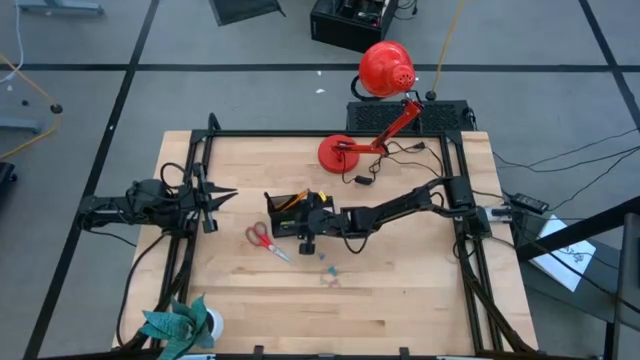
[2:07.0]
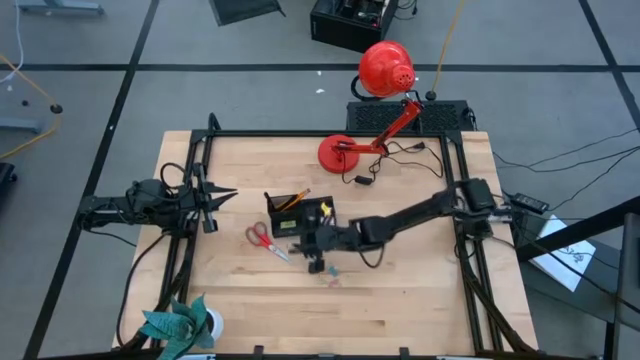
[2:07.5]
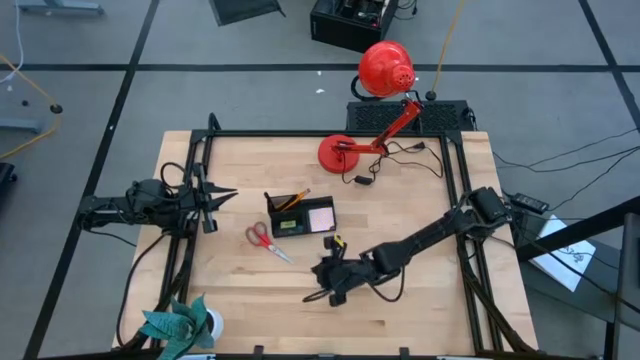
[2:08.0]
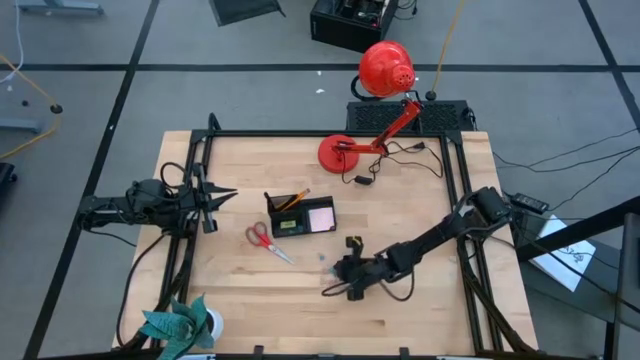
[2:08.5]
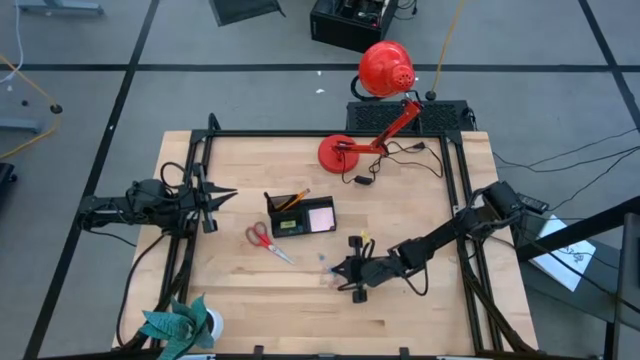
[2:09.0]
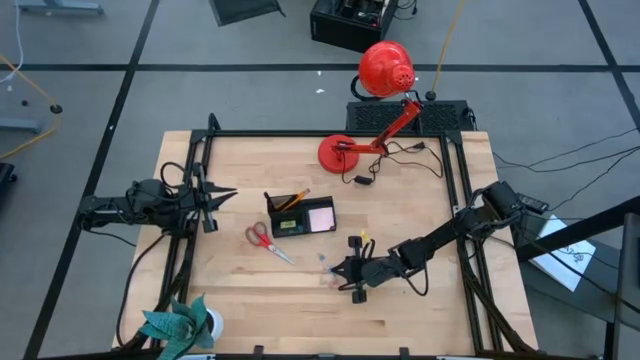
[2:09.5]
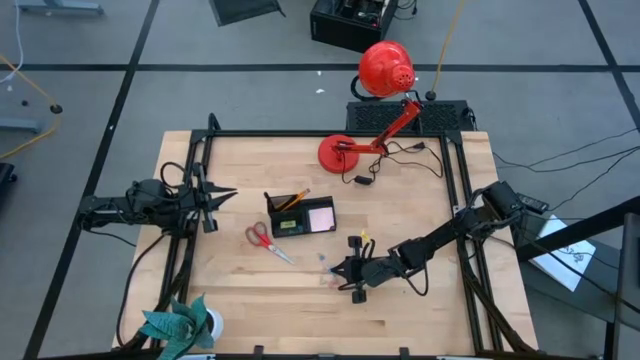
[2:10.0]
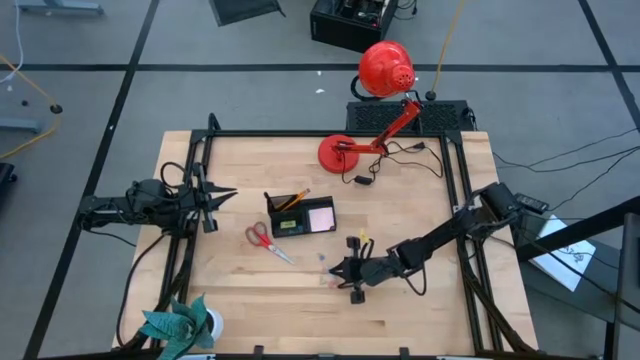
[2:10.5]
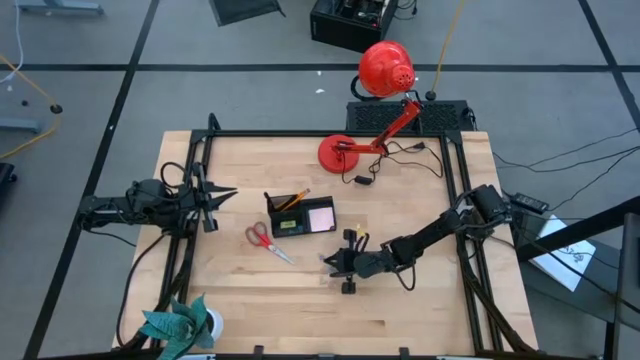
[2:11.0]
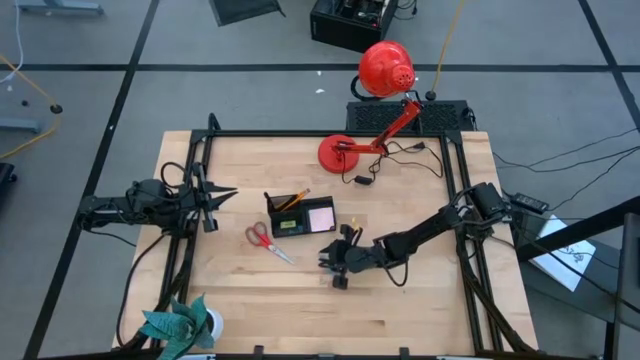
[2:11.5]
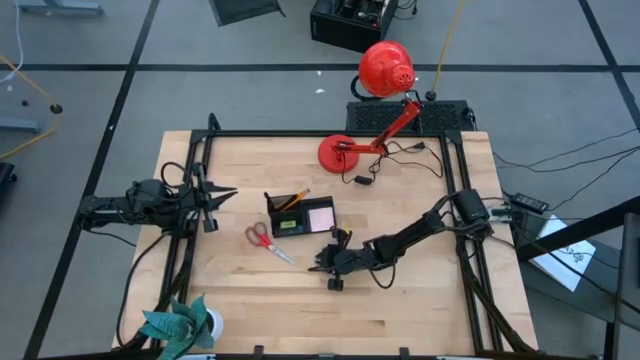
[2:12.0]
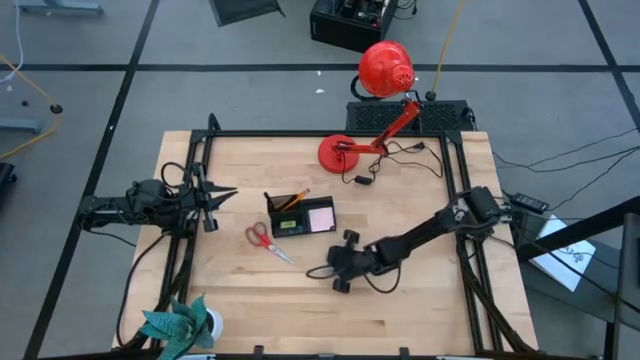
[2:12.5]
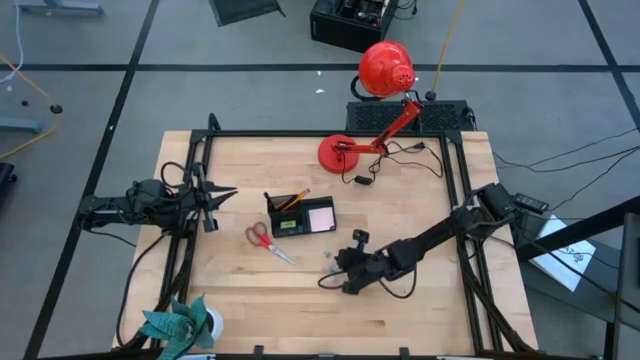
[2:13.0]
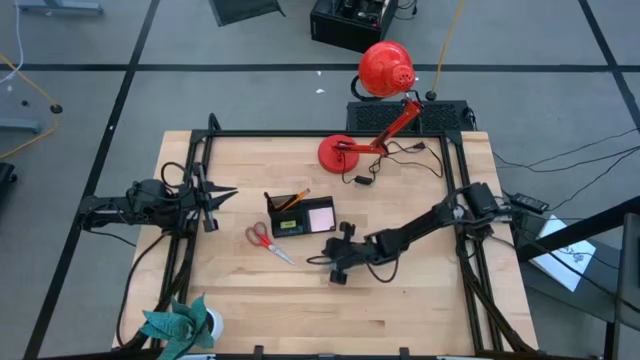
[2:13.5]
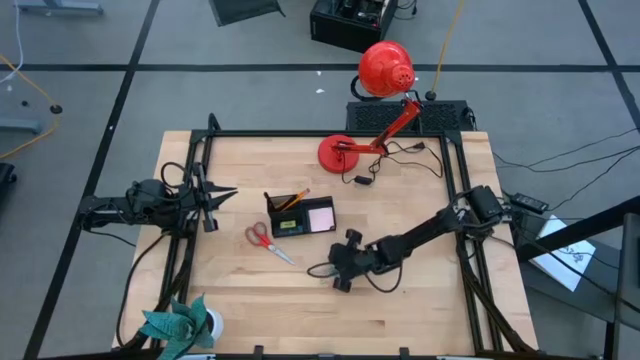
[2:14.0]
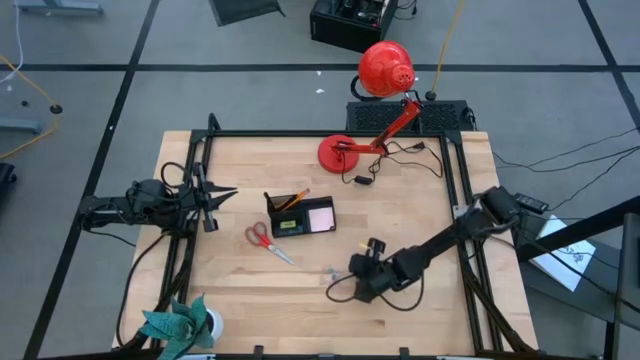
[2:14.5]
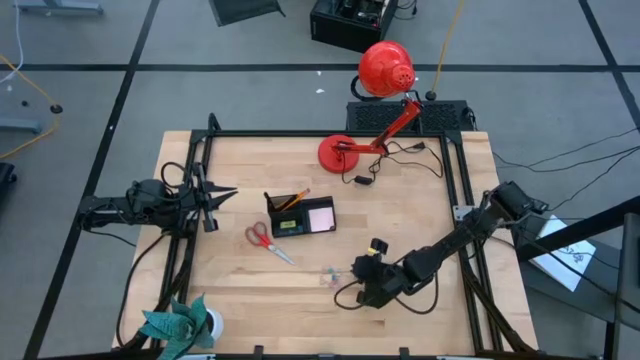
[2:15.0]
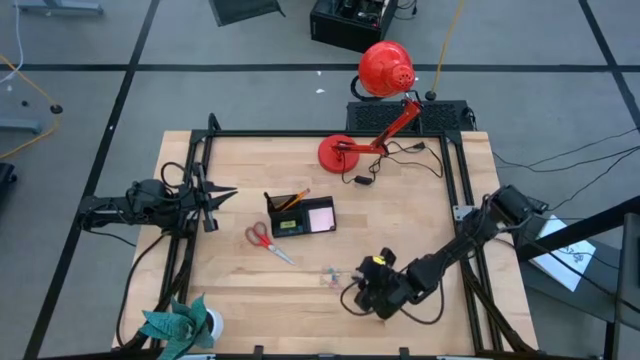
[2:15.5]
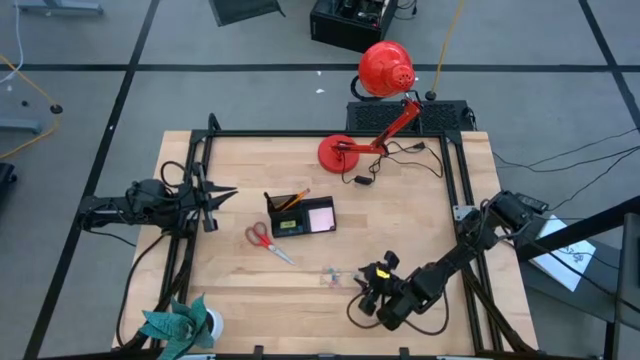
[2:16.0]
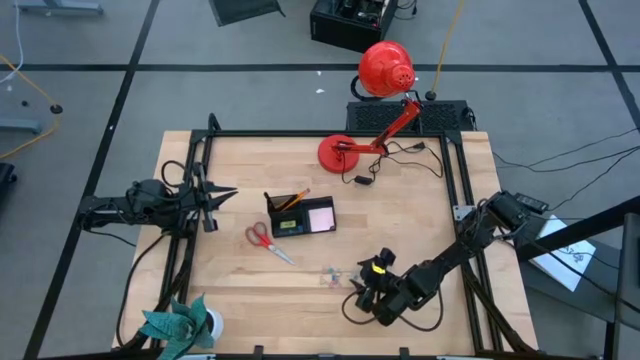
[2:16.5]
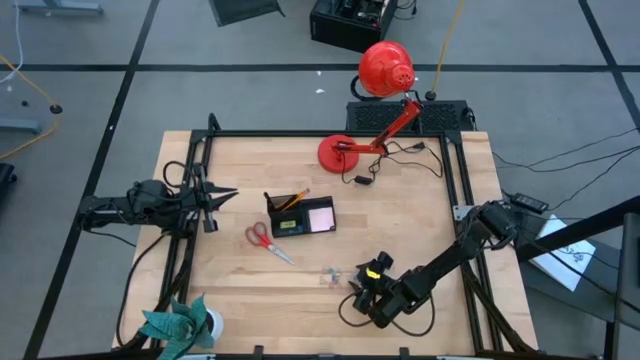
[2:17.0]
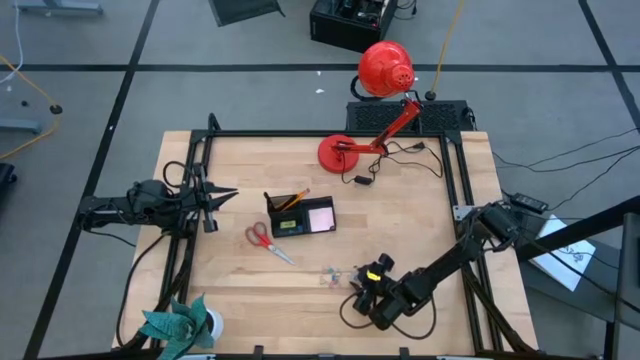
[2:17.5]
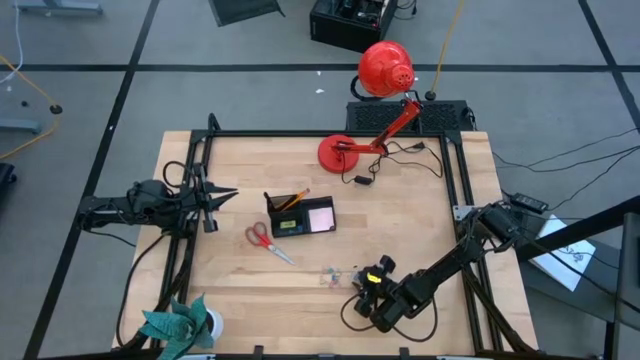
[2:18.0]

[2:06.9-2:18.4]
Task: Pick and place office supplies into organizer
Put the blue binder clip into the mesh desk organizer

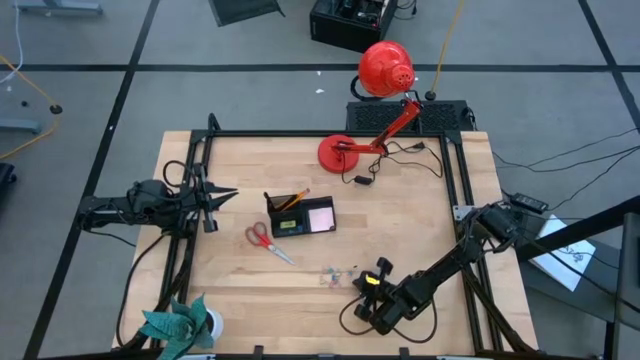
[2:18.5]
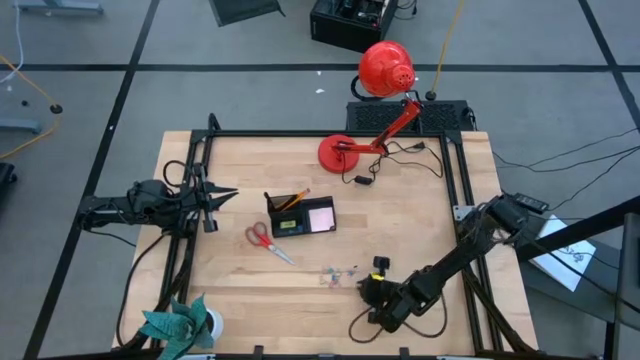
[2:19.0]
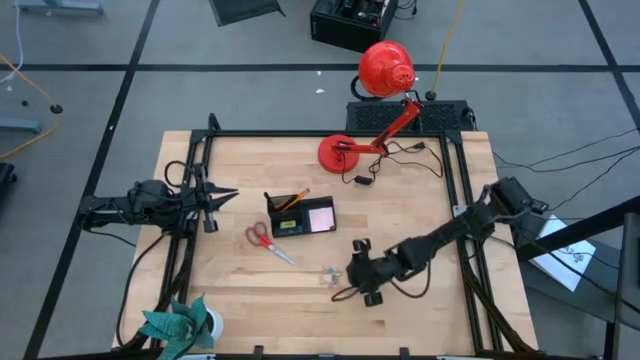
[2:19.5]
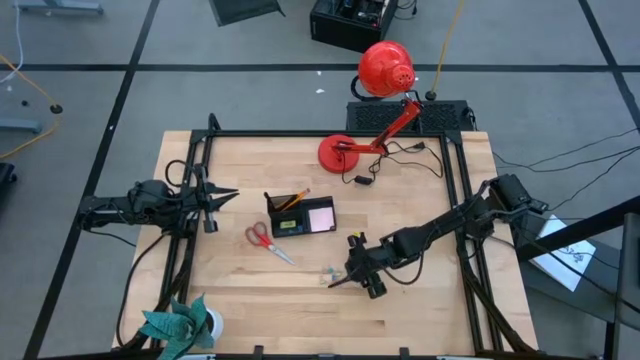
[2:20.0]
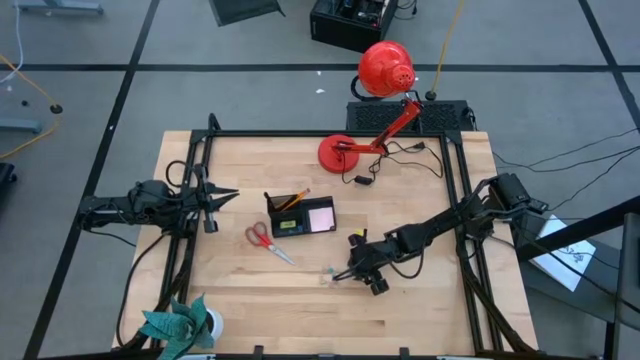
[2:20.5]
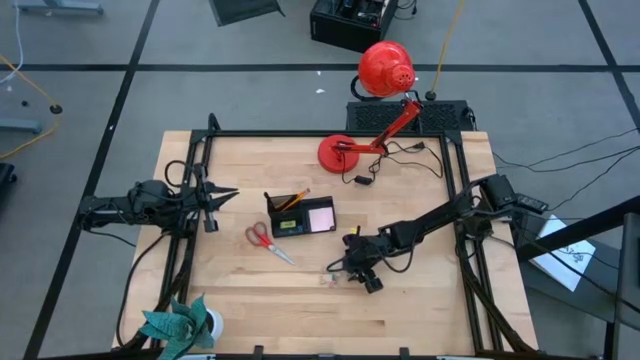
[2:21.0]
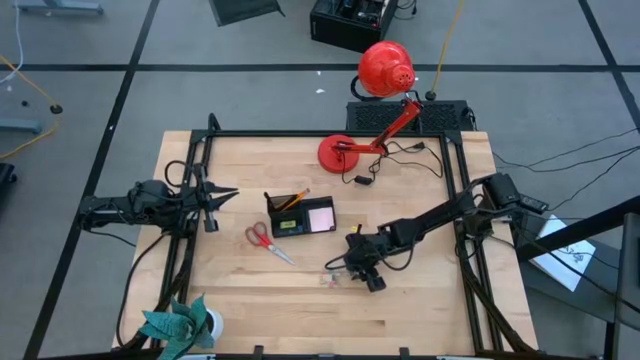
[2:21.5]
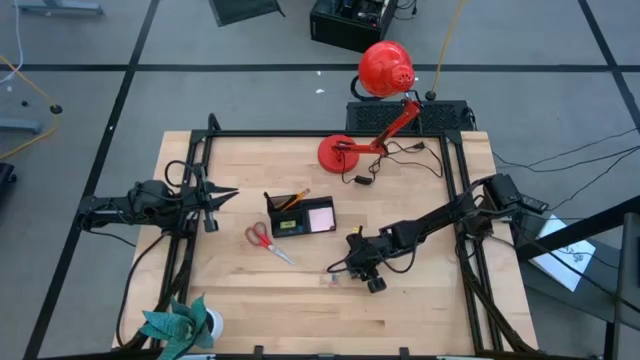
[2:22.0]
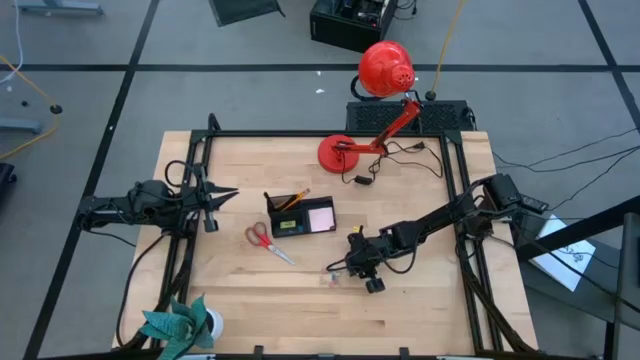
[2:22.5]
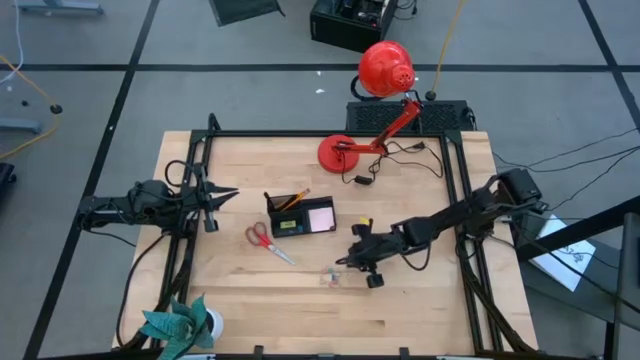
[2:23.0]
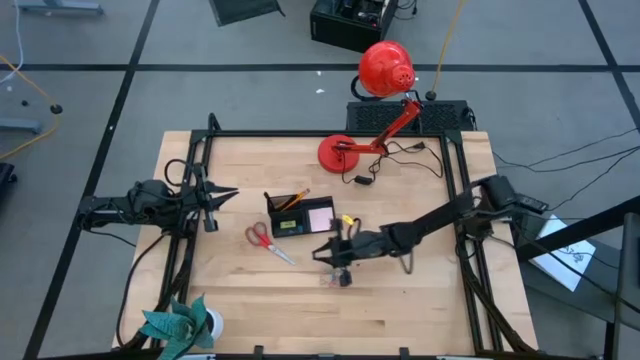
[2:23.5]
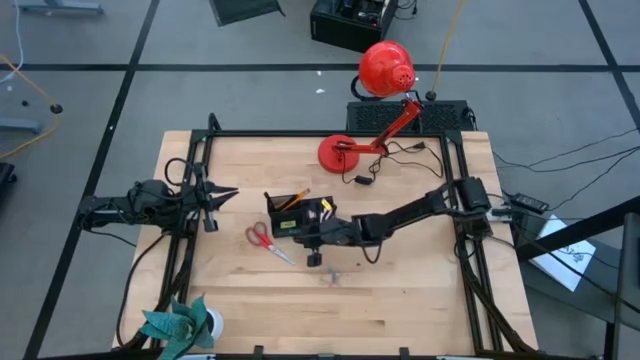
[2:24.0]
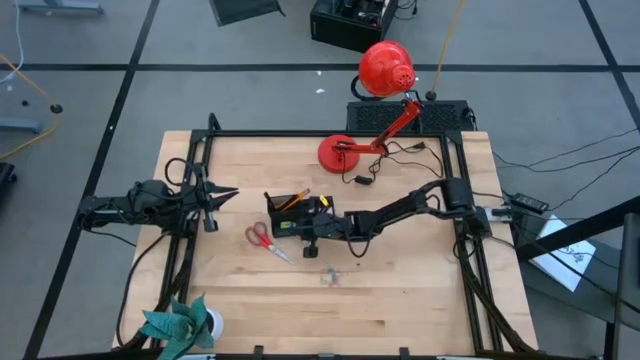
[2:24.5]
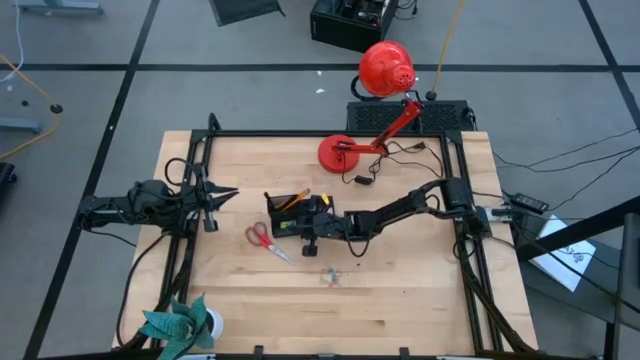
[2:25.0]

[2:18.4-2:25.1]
Put the blue binder clip into the mesh desk organizer

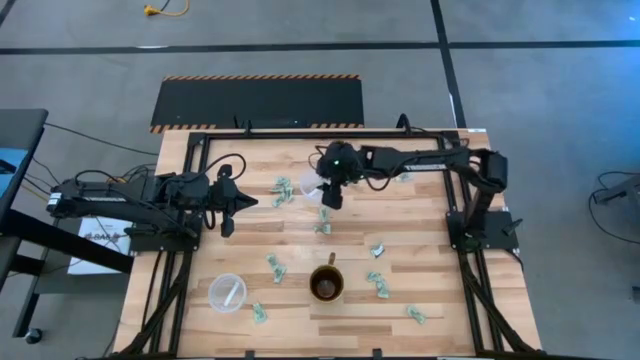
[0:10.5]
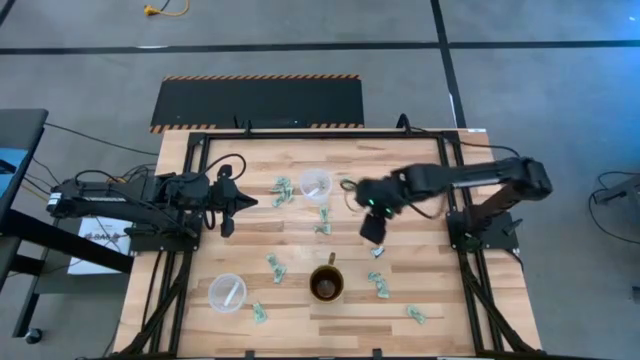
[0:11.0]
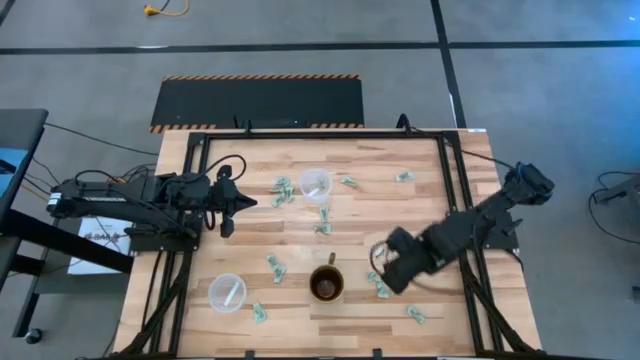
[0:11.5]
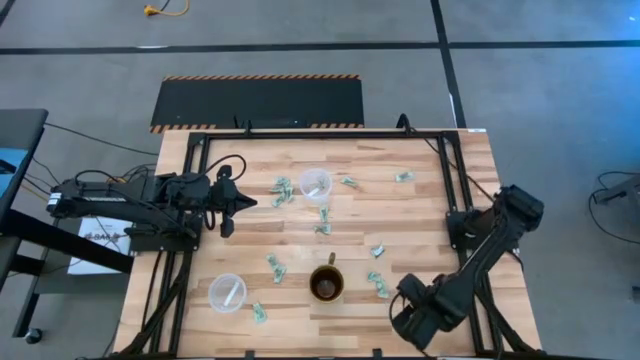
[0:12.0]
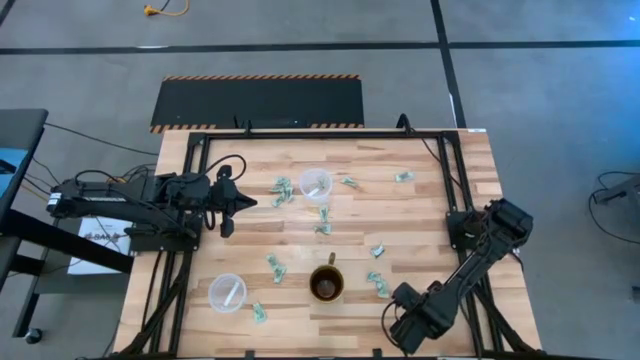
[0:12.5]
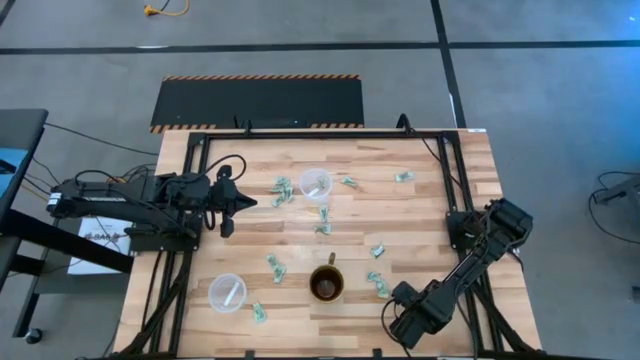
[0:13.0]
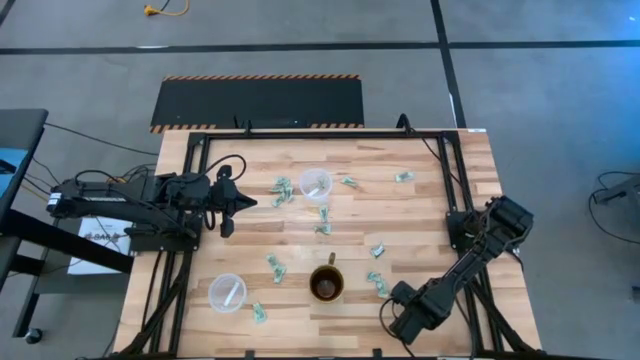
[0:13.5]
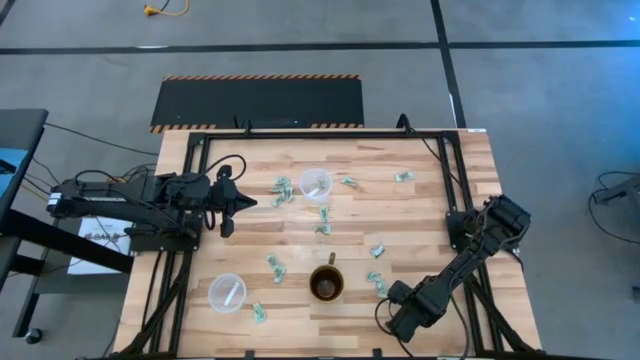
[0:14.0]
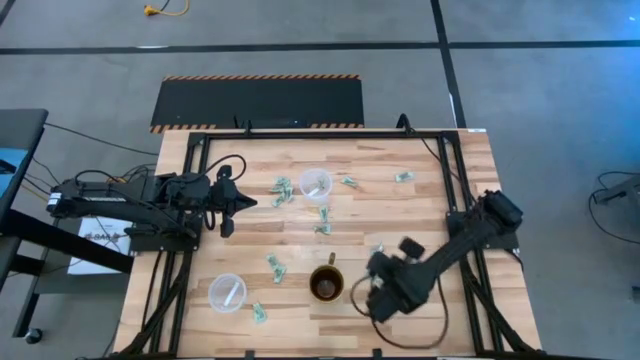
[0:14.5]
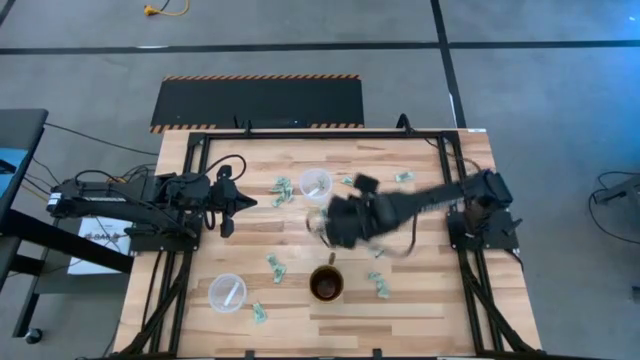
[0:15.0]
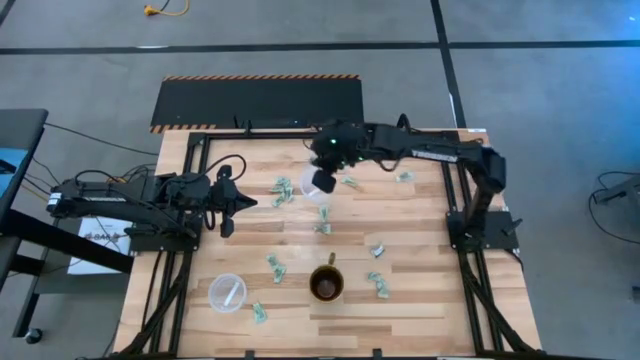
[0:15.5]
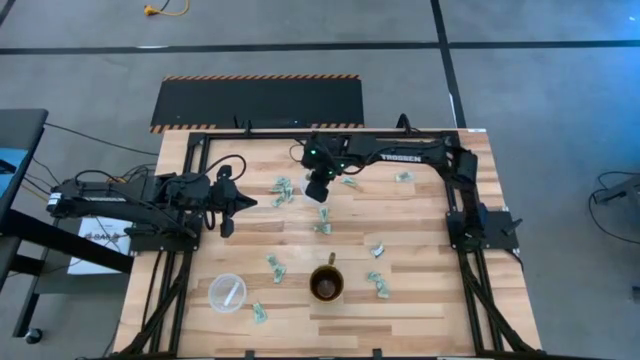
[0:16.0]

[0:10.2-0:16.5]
Task: Pick and place items into bin
Put the stevia packet into the top transparent bin
